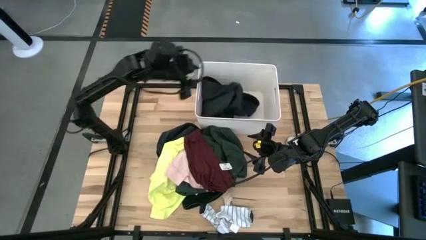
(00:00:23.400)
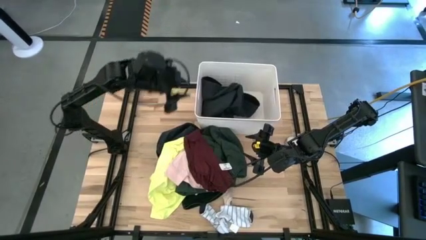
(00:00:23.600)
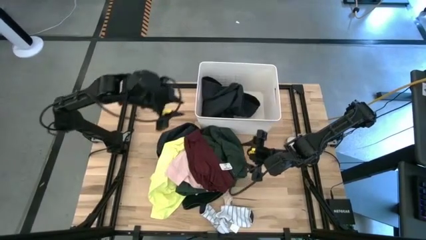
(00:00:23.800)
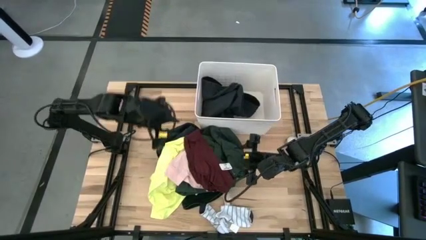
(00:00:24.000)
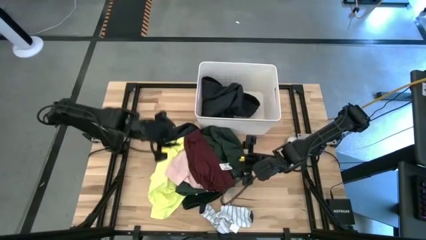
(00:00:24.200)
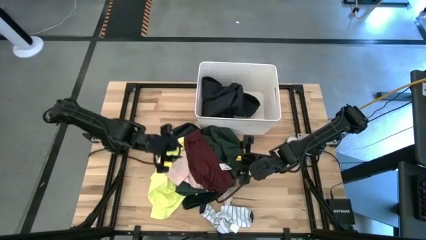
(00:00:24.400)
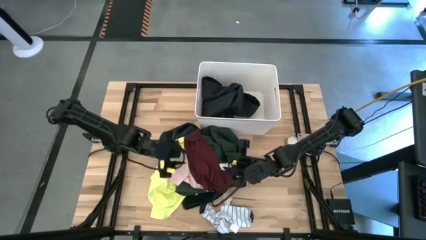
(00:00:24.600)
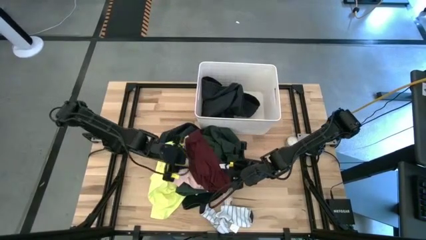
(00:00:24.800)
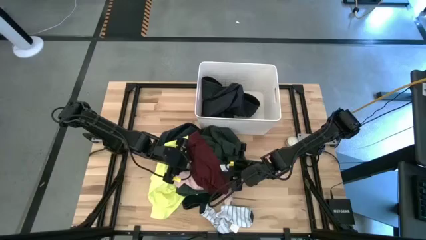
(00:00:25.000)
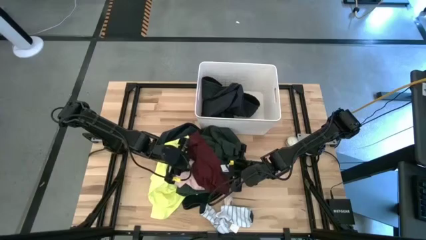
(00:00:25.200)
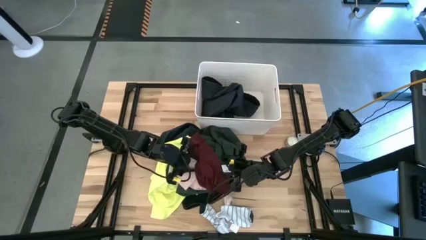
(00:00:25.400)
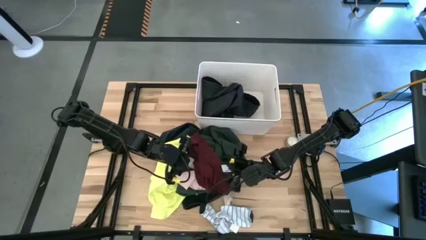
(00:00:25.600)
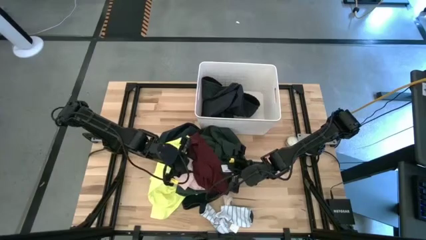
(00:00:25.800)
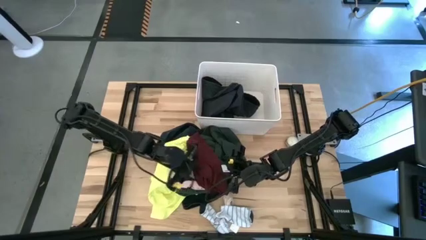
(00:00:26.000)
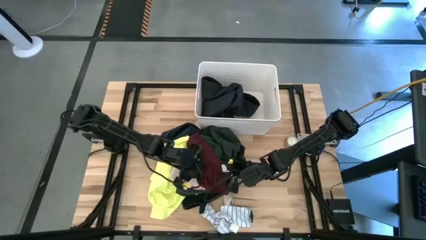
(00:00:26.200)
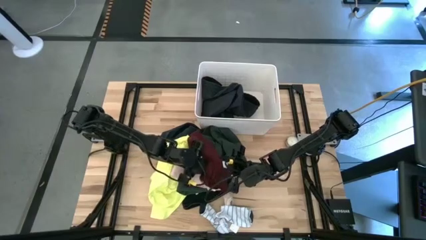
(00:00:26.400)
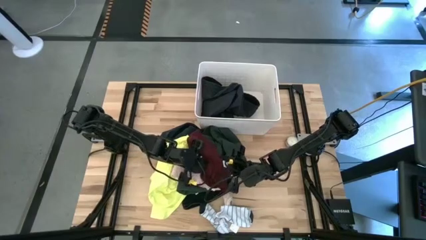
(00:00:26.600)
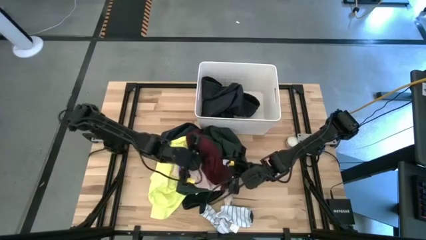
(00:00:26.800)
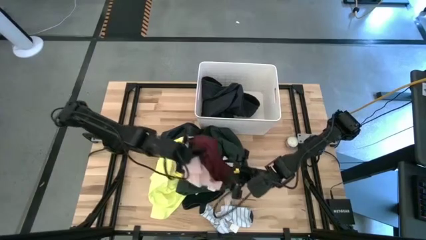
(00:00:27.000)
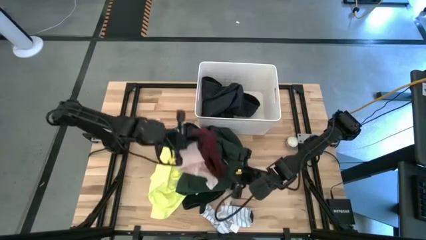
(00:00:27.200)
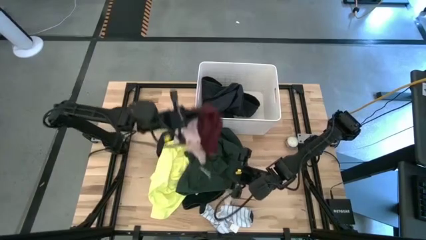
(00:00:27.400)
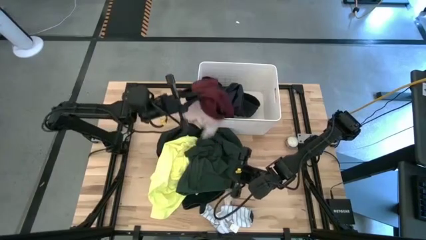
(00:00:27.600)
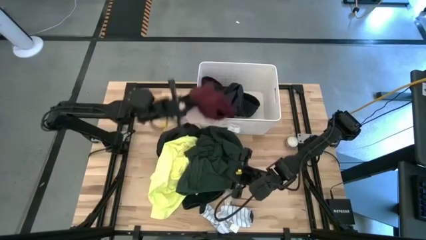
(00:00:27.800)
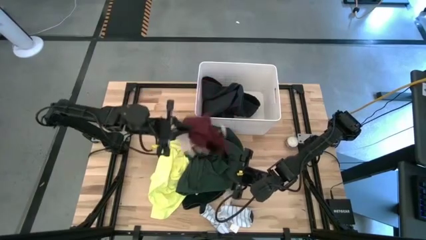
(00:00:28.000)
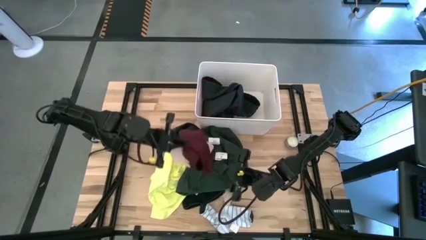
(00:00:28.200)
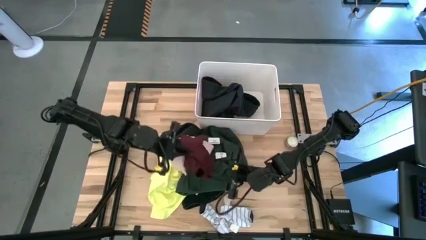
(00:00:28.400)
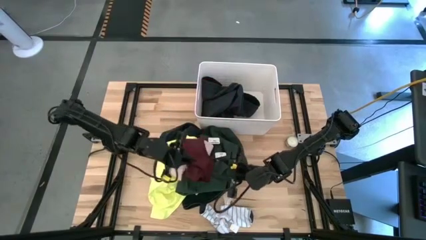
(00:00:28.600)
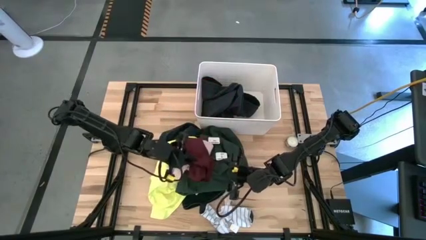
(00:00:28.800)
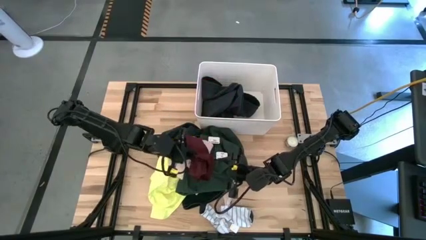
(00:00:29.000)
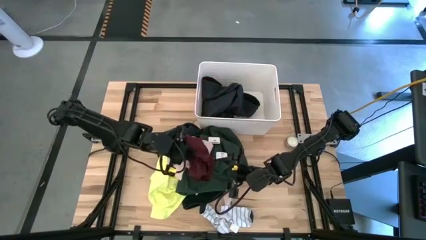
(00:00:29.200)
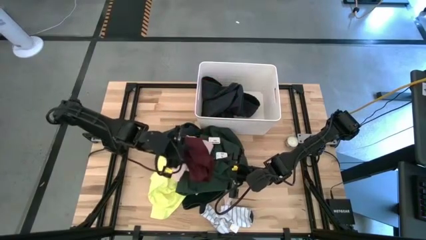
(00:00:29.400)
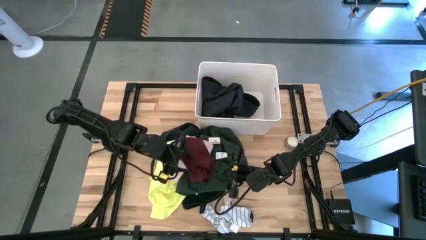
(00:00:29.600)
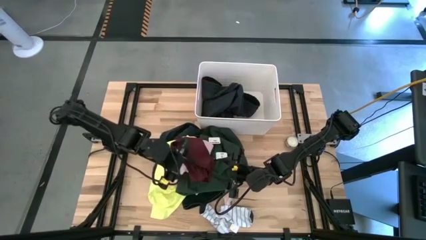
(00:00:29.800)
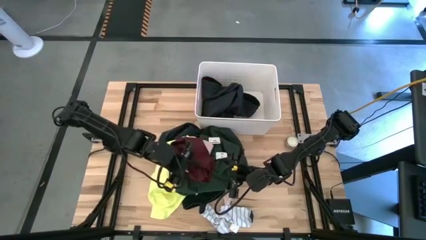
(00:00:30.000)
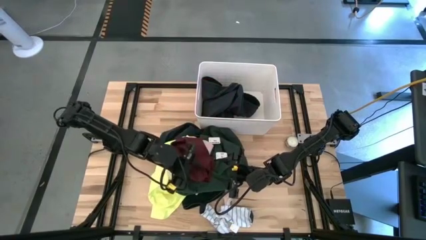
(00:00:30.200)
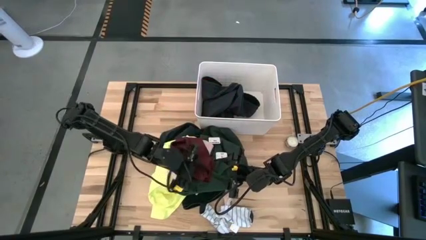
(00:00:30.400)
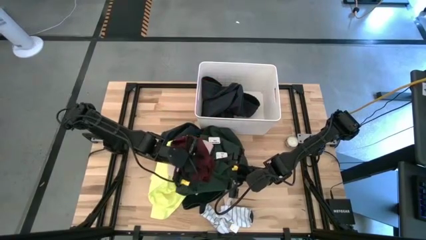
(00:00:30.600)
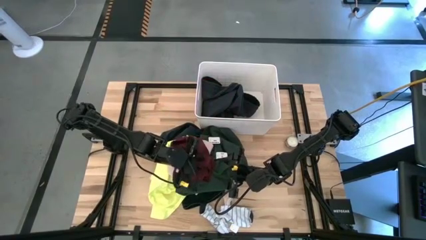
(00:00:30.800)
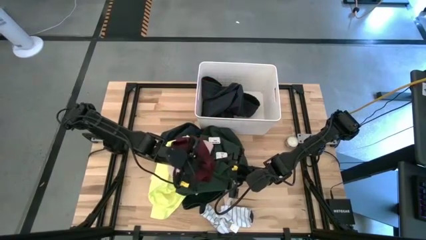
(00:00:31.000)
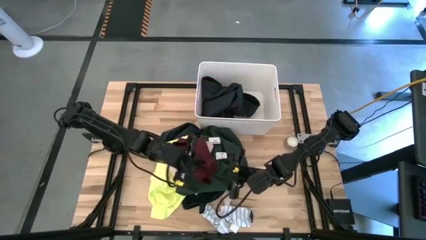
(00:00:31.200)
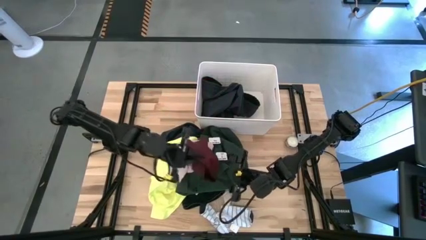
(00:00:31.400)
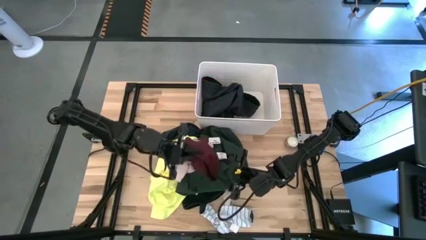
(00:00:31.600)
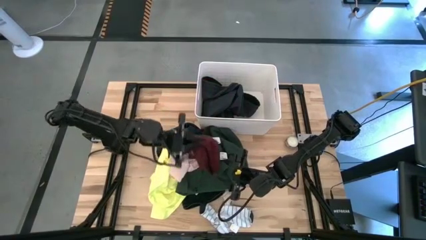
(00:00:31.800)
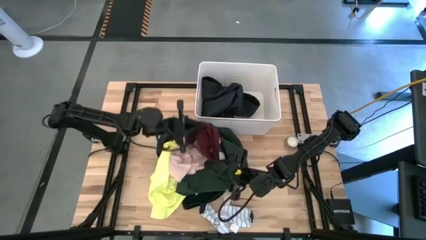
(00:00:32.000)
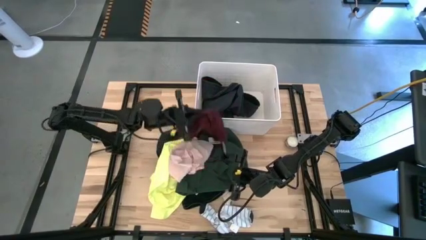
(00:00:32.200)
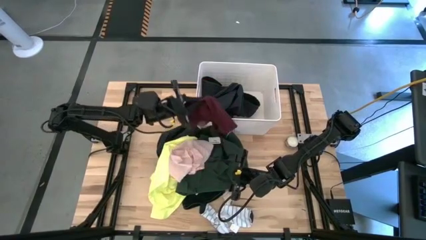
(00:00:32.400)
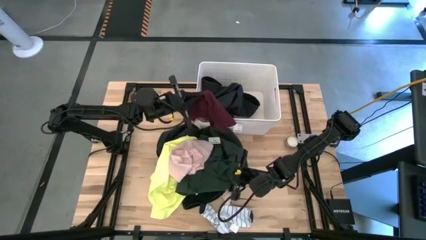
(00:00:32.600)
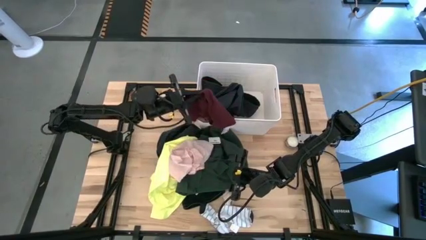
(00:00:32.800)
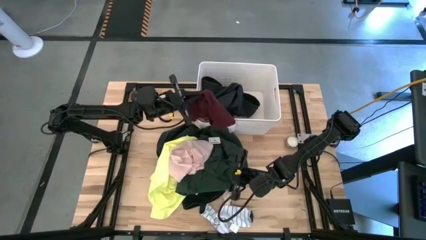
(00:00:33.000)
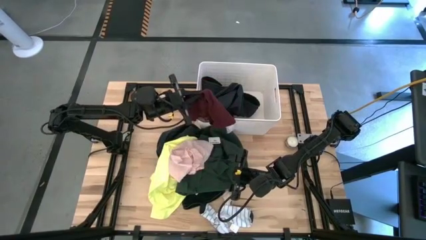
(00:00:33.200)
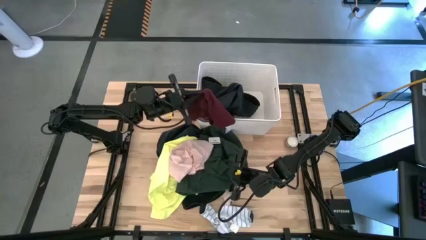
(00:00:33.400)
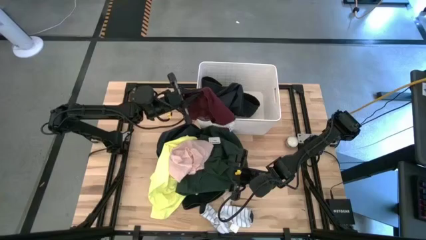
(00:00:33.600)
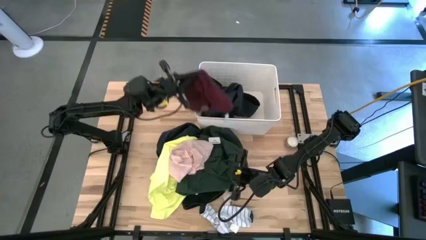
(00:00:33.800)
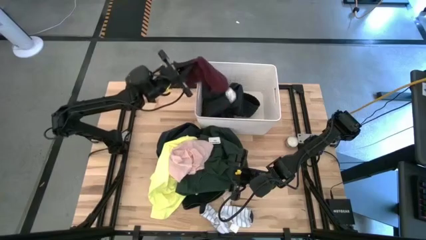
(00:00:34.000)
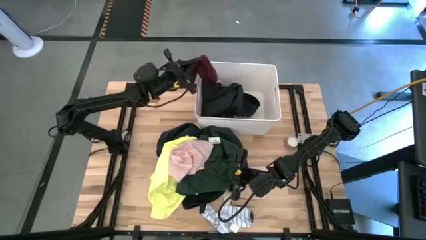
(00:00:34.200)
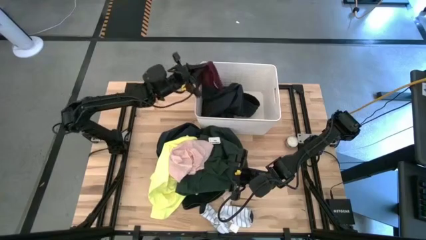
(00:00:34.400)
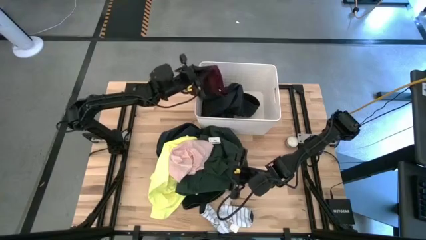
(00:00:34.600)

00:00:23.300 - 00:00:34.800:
Task: Sort clothes
Put the red underwear into the white laundry organizer

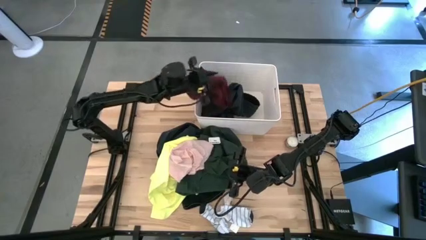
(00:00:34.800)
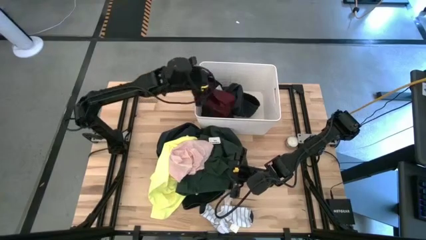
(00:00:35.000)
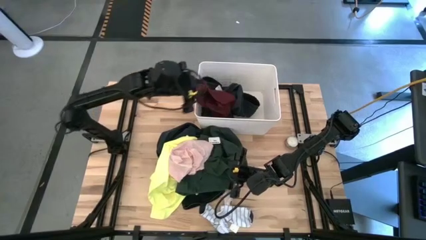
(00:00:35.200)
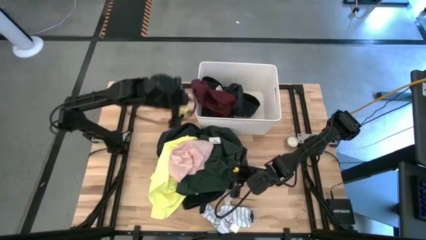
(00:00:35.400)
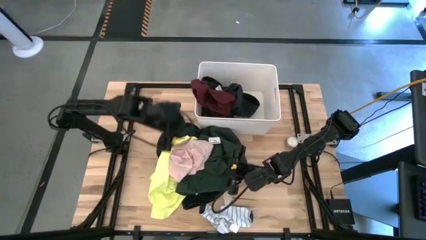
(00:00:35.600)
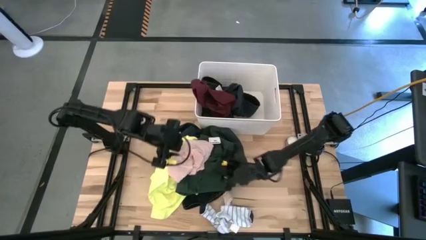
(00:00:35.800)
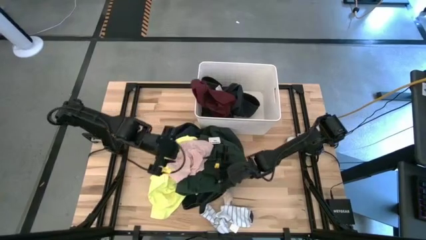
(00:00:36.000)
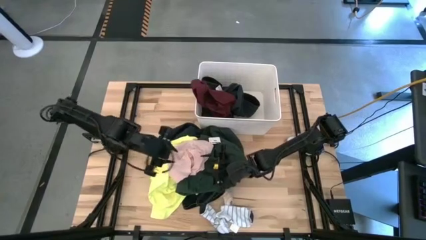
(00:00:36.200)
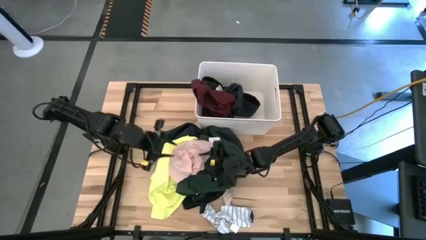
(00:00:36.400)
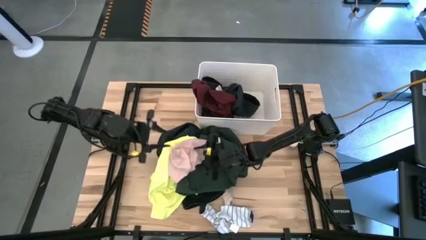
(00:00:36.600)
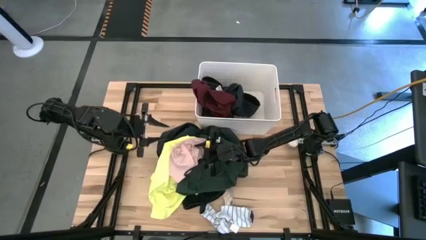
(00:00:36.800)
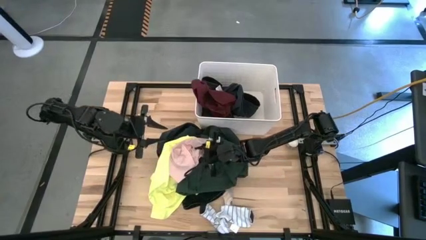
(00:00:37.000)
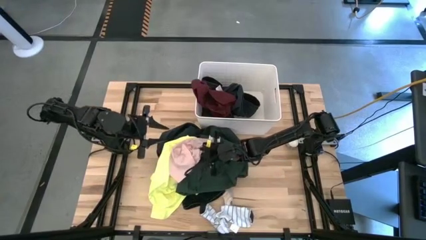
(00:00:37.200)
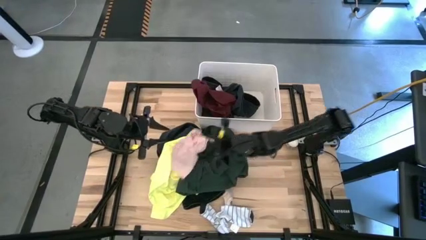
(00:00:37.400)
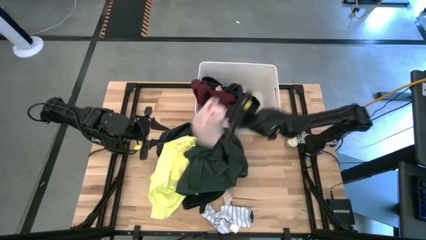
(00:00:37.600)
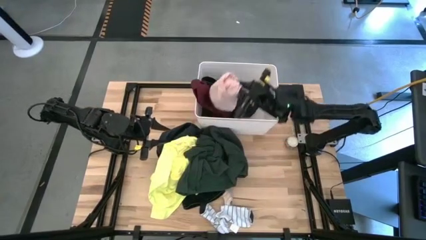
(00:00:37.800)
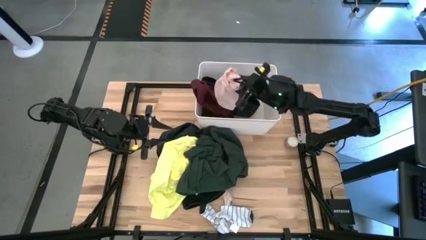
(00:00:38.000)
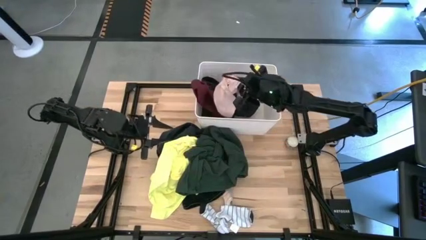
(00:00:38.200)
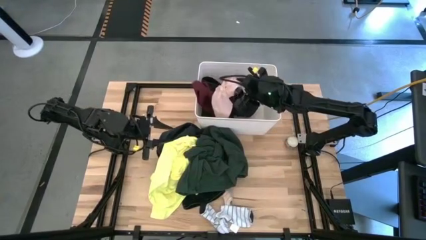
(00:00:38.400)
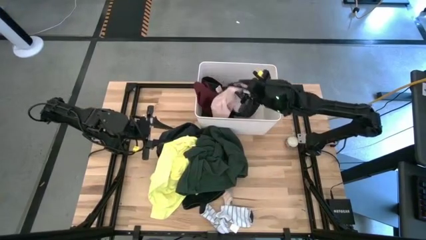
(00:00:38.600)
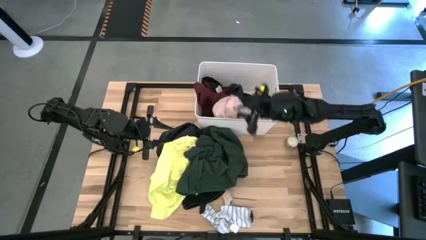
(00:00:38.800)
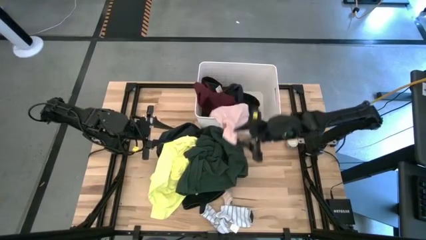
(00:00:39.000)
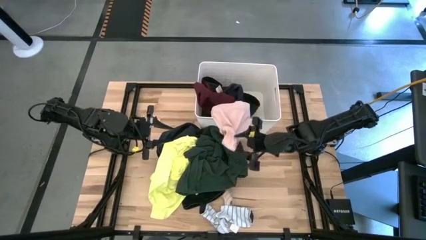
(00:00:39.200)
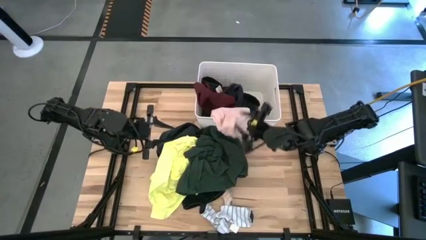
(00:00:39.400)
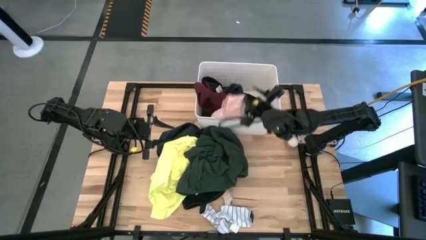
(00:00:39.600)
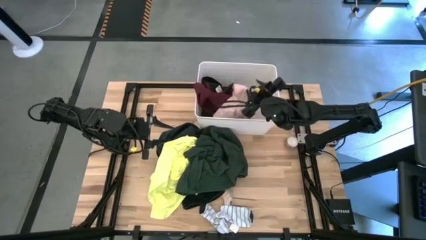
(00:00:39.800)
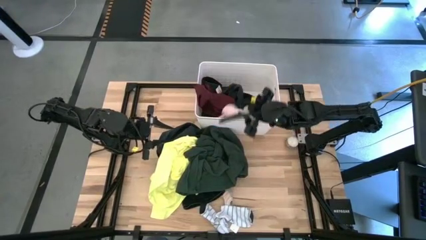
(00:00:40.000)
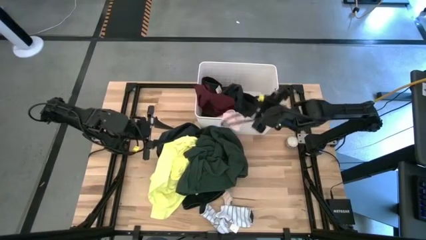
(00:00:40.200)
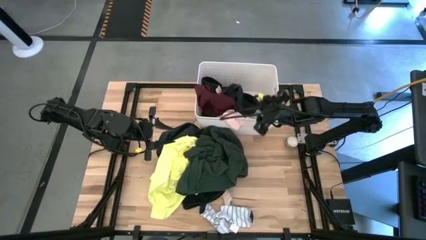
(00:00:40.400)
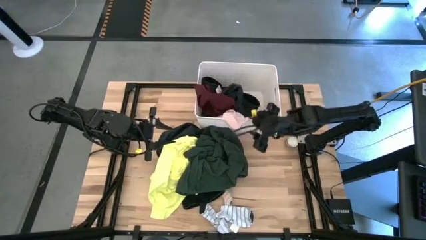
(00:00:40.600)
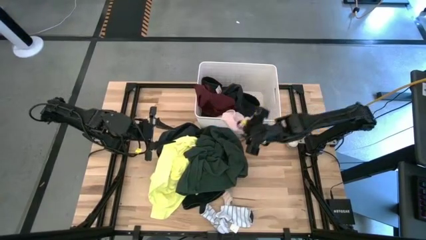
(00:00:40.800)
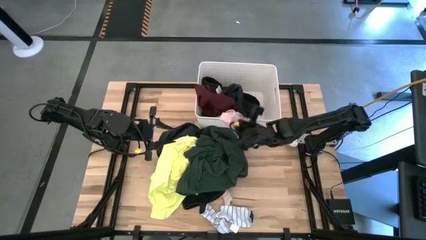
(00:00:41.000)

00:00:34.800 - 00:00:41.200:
Put the pink underwear into the white laundry organizer
